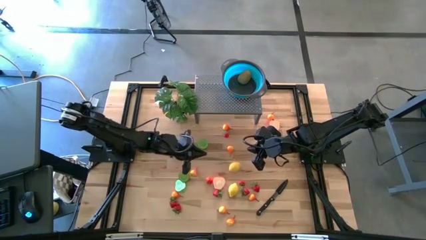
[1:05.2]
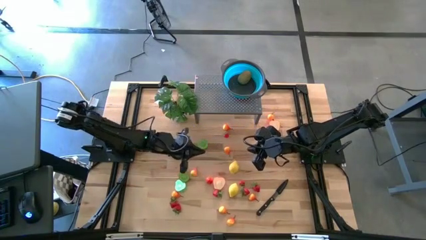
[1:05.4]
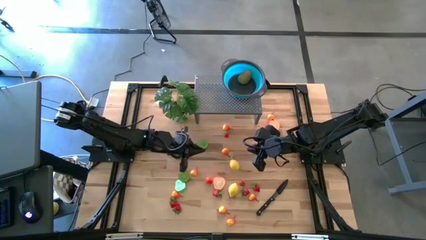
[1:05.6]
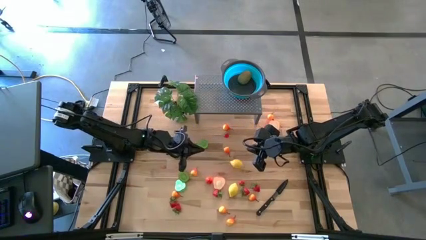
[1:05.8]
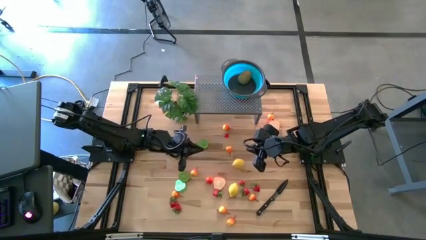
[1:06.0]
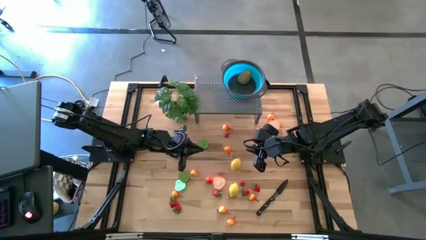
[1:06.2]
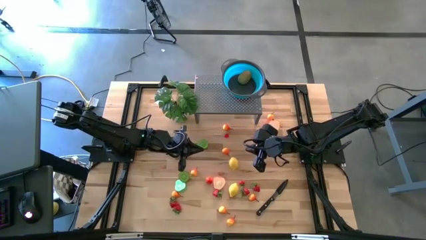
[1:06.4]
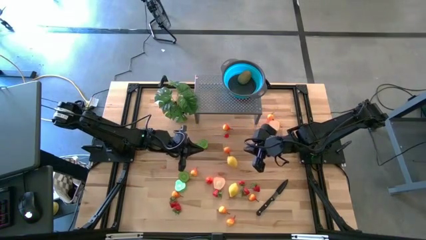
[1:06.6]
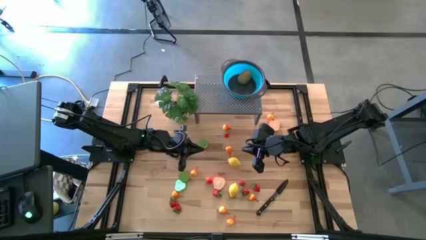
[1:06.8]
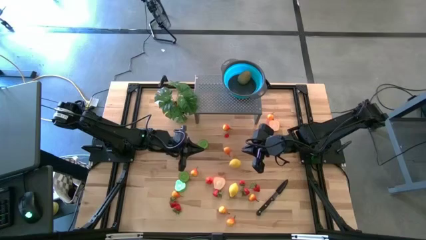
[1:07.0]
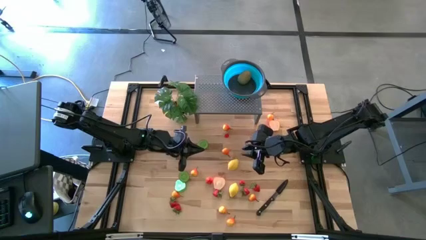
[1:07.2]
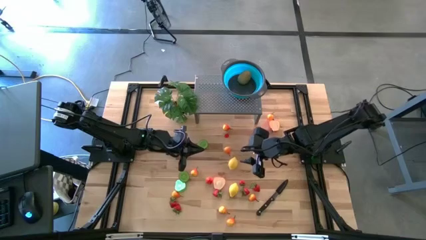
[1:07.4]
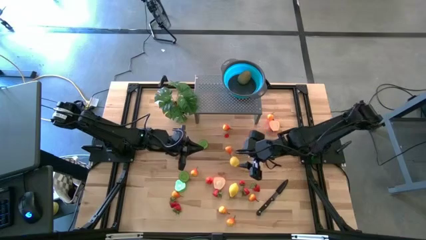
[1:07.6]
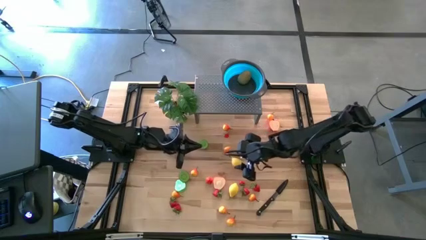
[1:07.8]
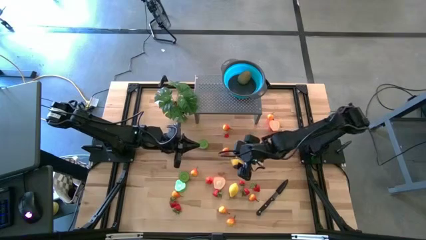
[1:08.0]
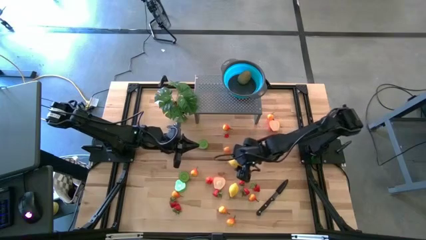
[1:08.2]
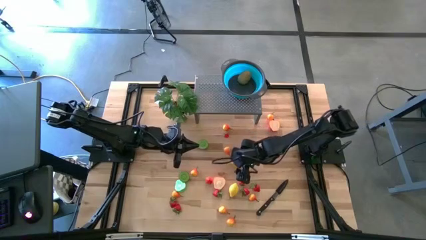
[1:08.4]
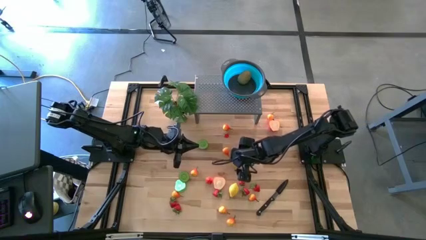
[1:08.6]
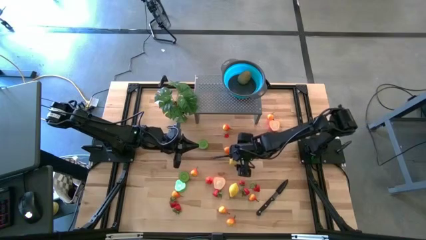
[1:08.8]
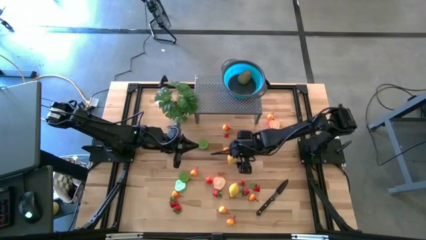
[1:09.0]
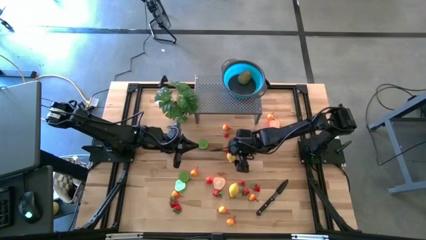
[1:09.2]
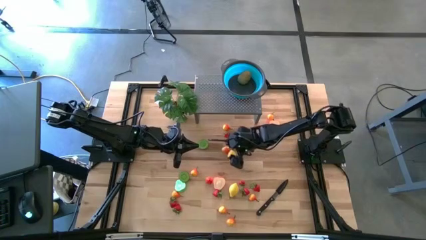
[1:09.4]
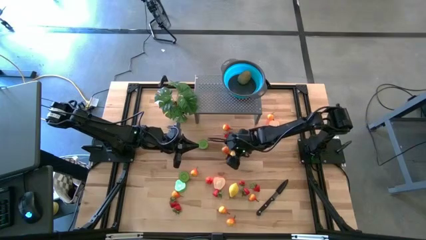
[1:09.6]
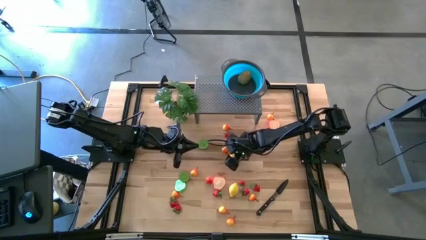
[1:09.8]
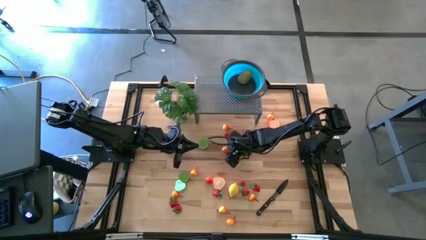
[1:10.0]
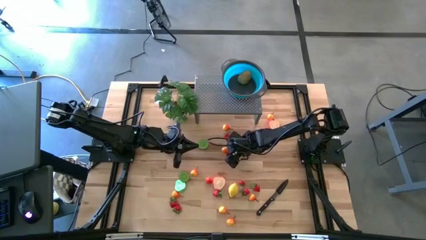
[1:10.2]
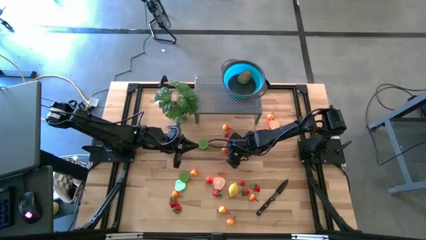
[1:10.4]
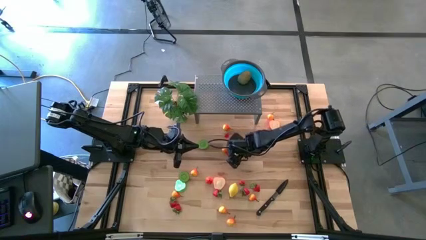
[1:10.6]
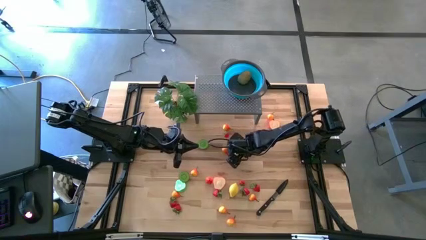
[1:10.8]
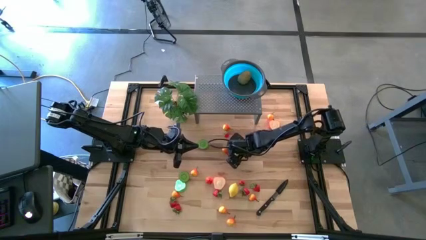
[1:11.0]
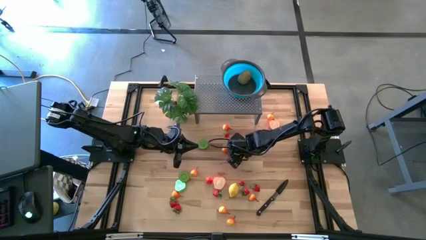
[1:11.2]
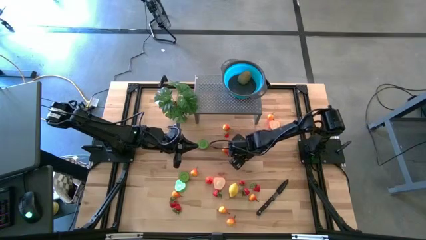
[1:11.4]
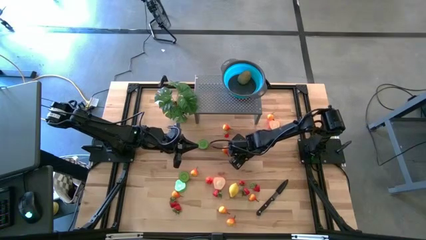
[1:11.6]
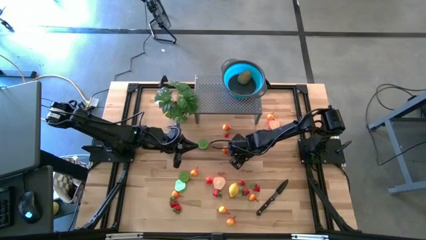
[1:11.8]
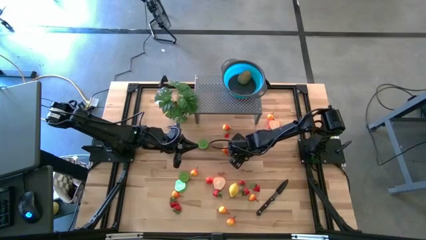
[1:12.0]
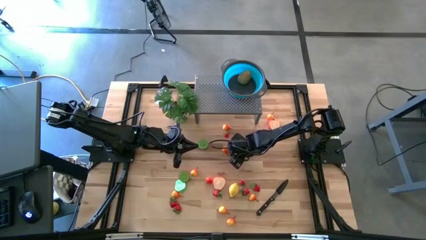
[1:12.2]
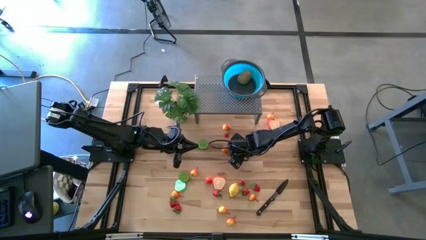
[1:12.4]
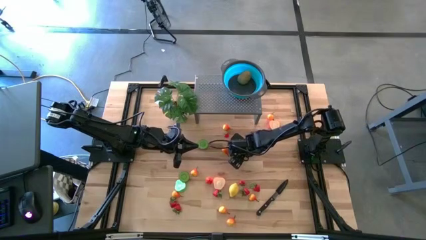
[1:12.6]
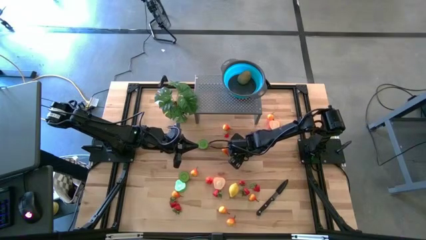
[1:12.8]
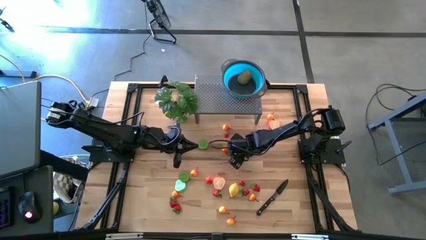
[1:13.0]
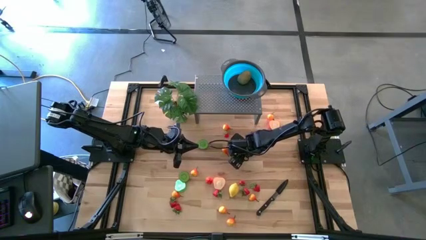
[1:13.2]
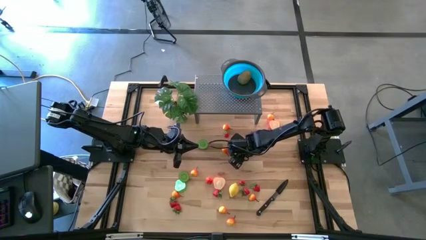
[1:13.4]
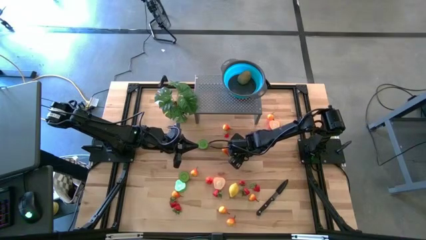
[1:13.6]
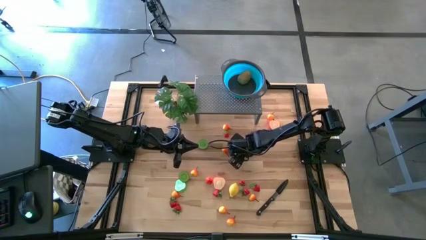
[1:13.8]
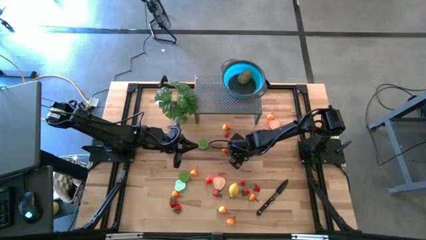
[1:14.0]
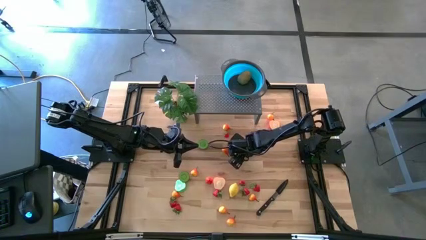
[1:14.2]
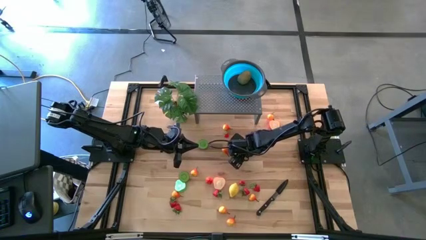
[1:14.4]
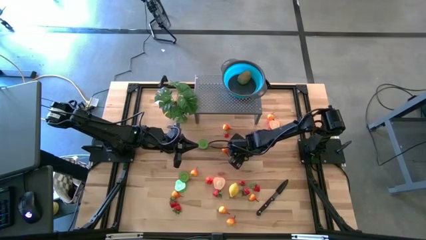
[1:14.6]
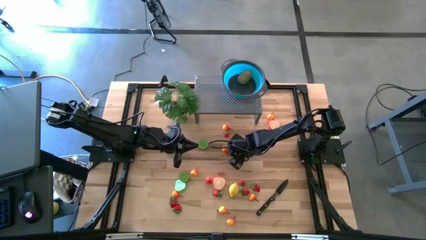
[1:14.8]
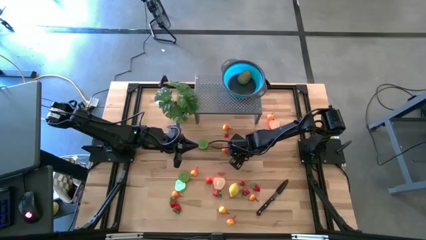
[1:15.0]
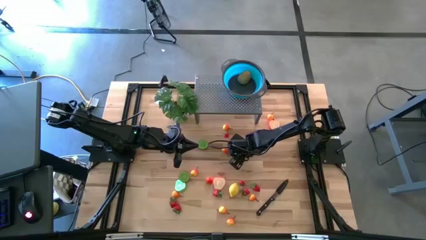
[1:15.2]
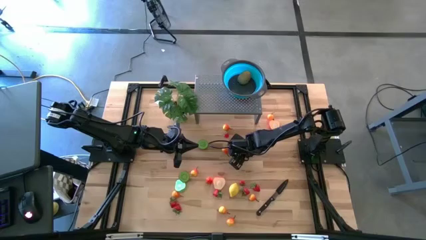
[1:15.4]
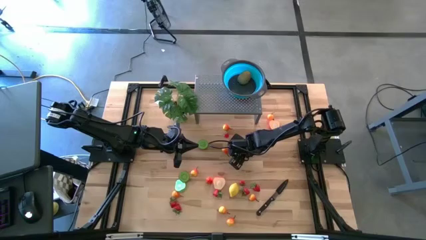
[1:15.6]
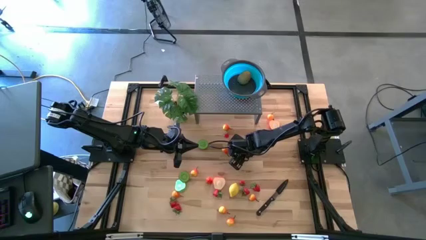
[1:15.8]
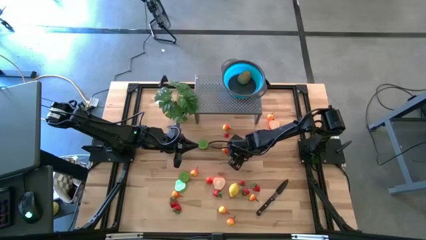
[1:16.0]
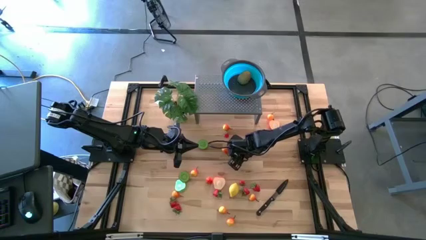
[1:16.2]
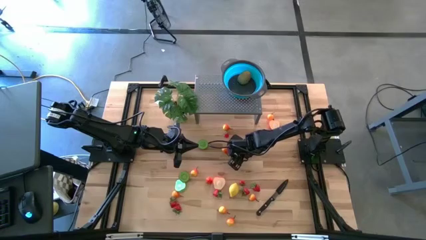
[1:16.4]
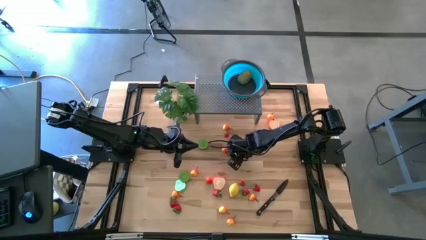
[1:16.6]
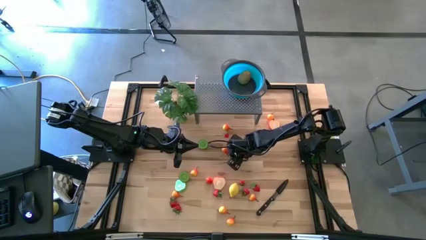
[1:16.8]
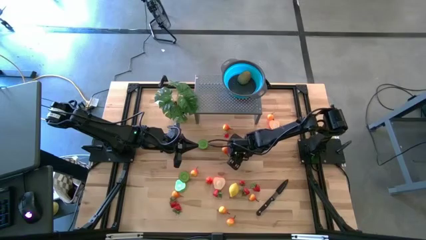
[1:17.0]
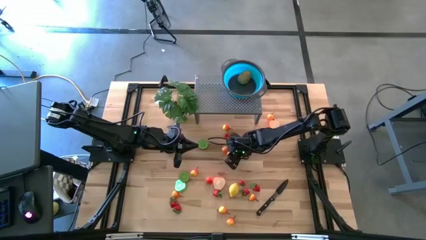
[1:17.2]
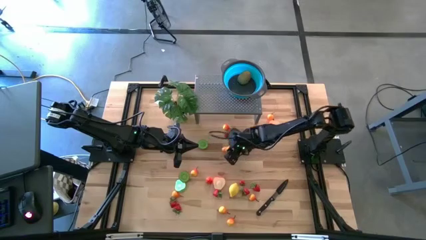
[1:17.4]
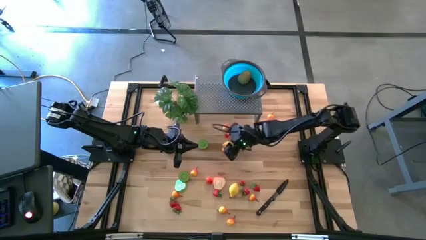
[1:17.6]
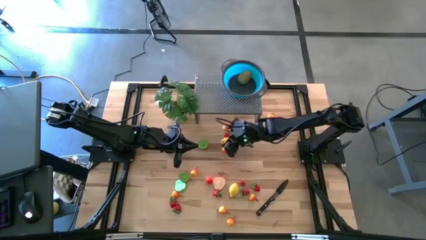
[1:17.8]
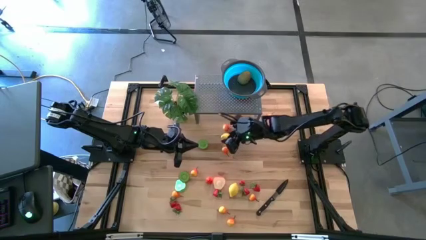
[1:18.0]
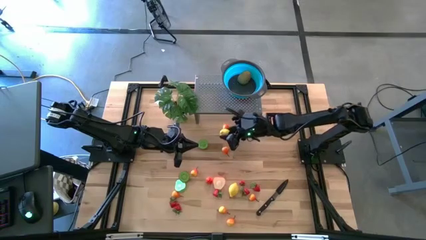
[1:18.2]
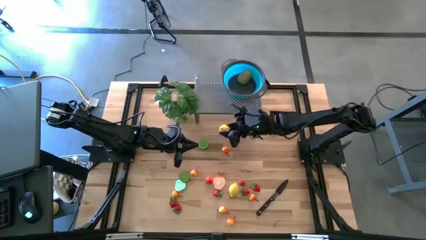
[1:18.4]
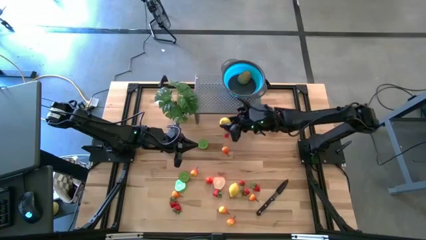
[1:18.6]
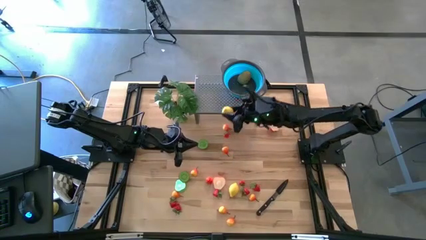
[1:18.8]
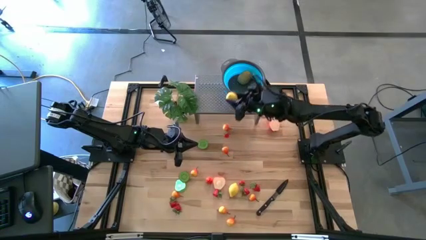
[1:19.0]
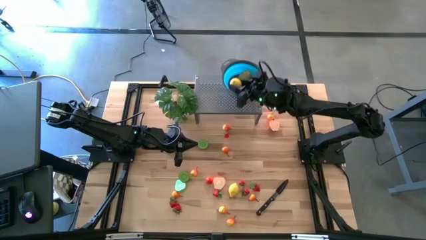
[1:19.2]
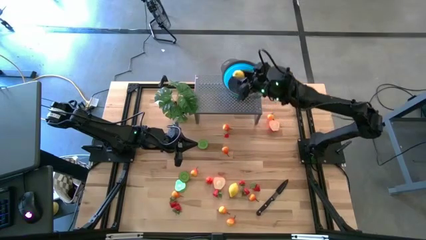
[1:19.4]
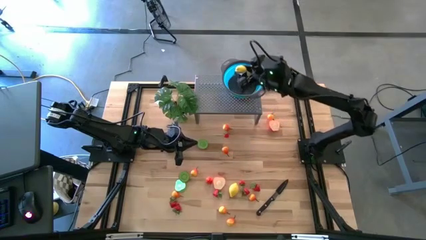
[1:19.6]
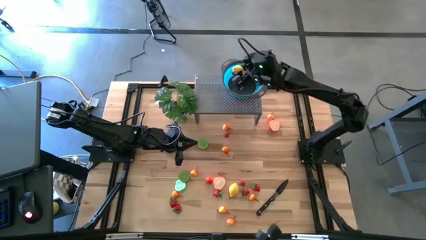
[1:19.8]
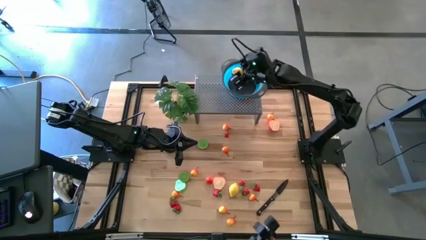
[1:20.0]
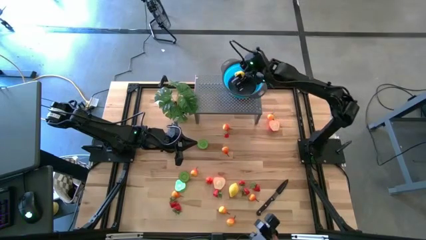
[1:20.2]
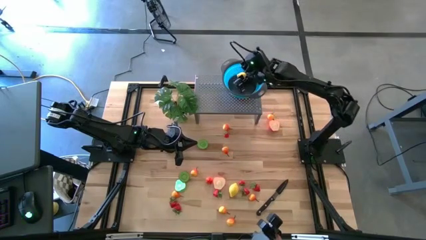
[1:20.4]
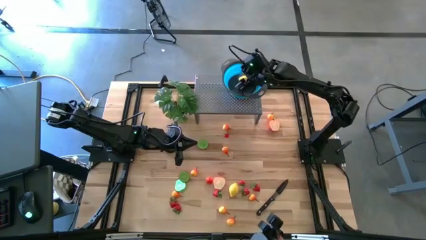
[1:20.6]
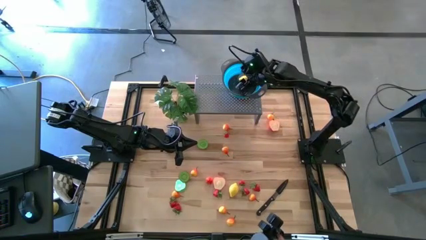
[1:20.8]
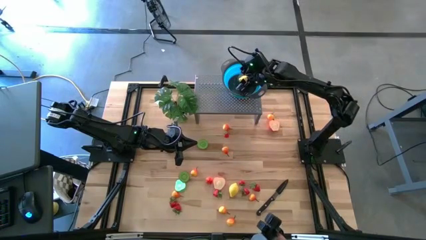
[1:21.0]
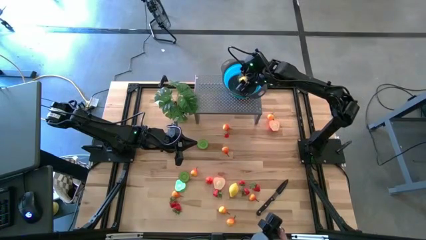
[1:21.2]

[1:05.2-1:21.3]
Task: Pick & Place Fruit
Put the yellow lemon in the blue bowl on the shelf
